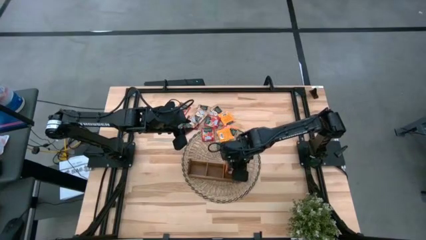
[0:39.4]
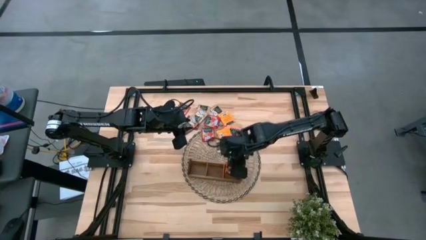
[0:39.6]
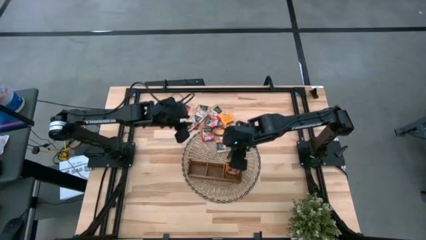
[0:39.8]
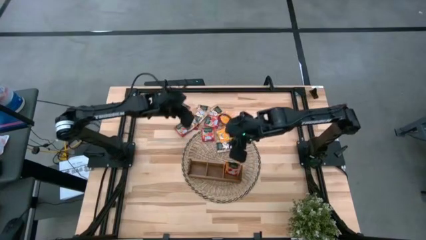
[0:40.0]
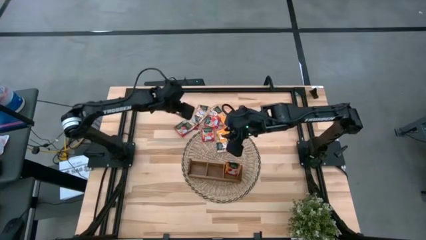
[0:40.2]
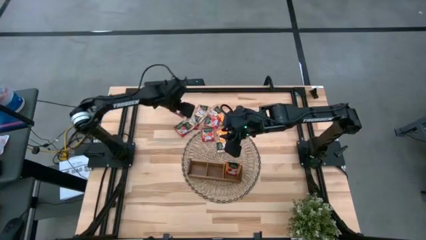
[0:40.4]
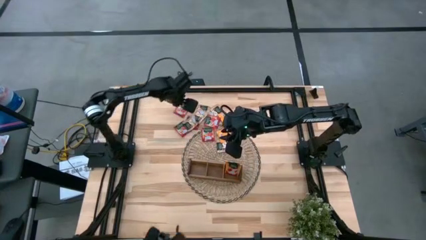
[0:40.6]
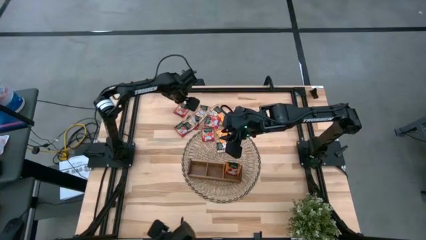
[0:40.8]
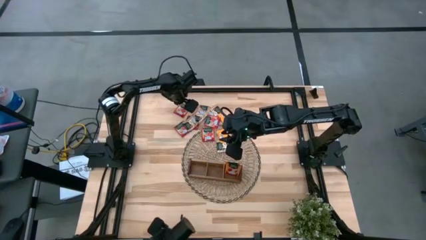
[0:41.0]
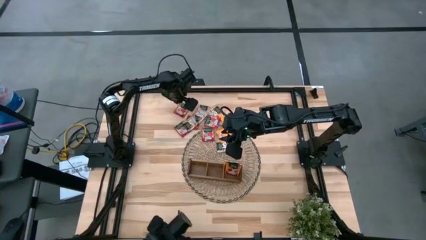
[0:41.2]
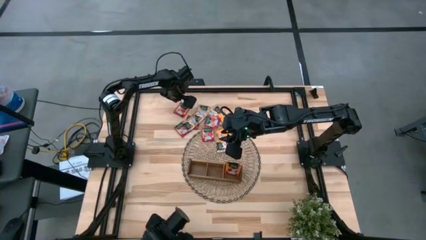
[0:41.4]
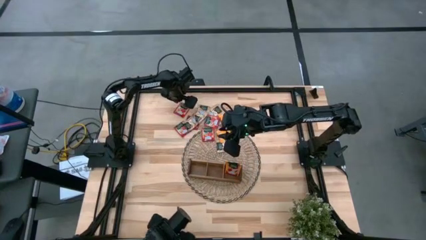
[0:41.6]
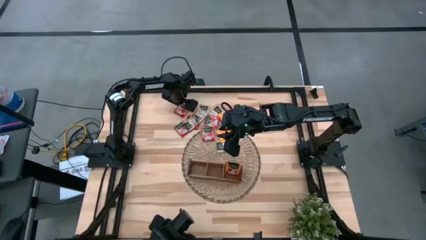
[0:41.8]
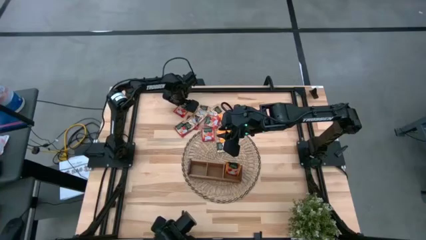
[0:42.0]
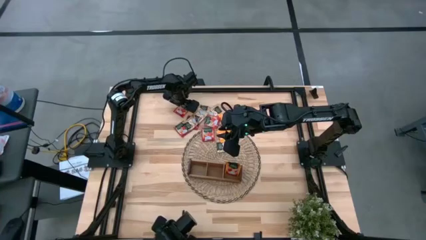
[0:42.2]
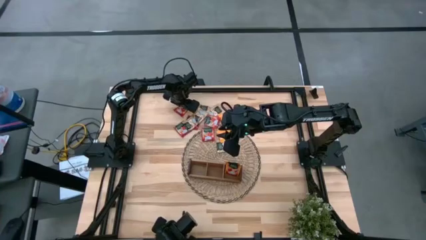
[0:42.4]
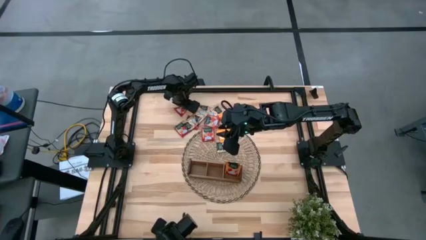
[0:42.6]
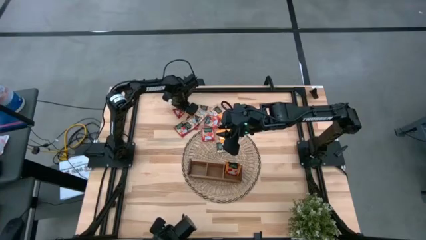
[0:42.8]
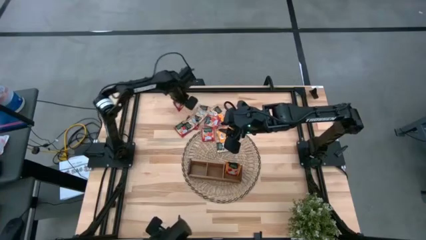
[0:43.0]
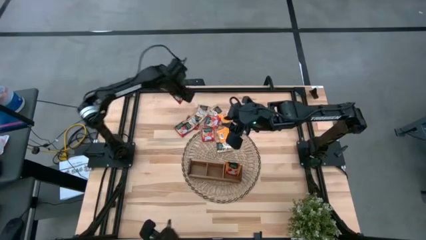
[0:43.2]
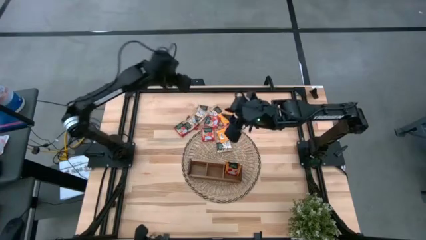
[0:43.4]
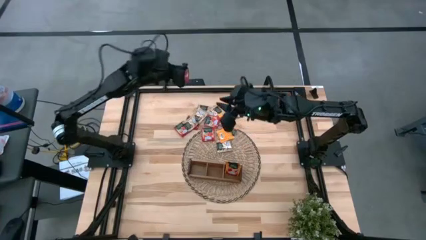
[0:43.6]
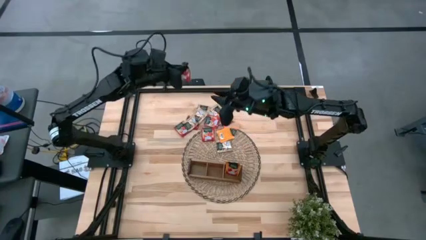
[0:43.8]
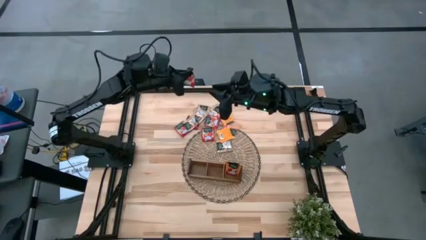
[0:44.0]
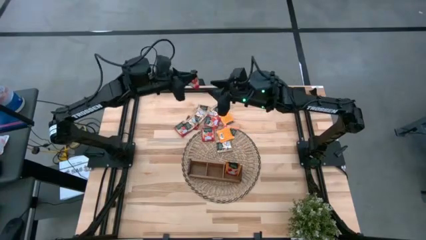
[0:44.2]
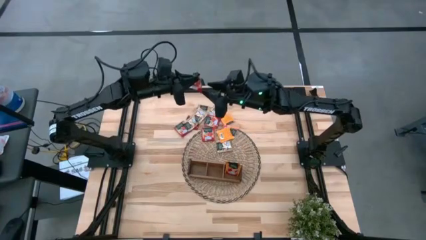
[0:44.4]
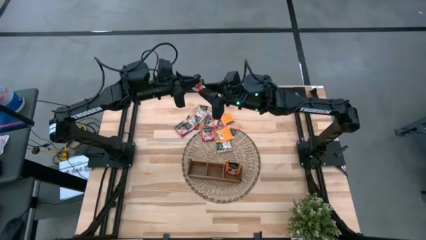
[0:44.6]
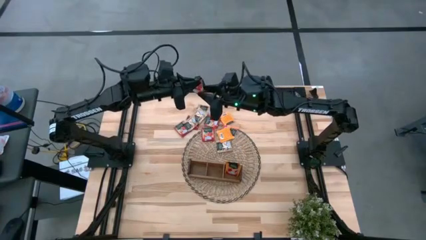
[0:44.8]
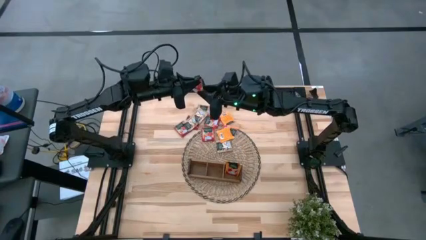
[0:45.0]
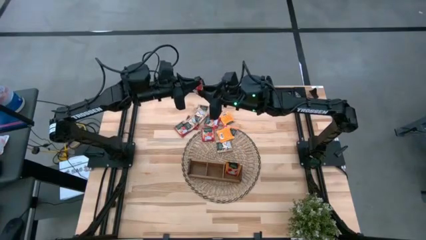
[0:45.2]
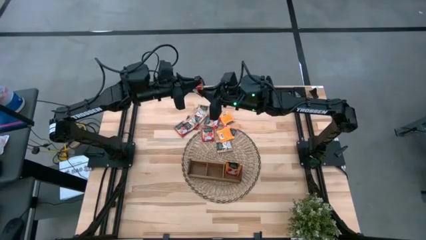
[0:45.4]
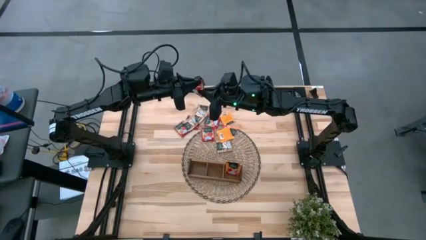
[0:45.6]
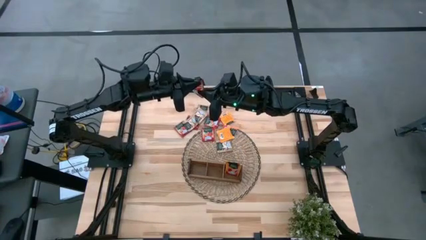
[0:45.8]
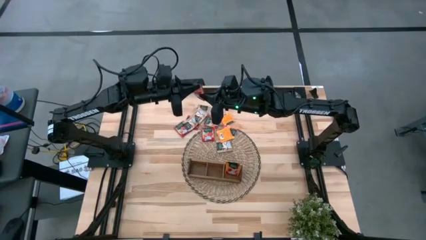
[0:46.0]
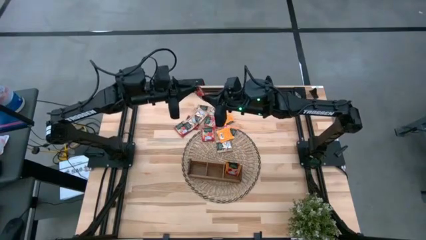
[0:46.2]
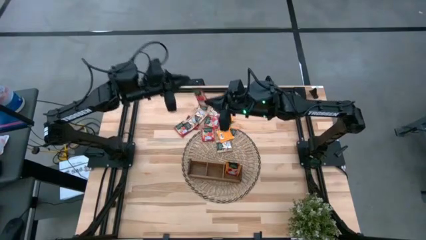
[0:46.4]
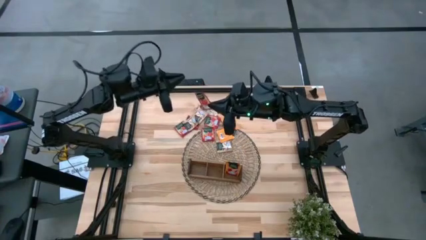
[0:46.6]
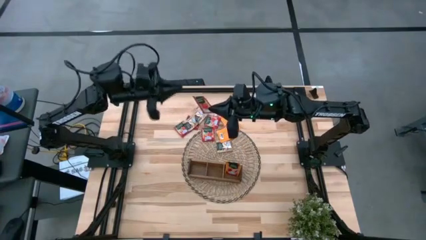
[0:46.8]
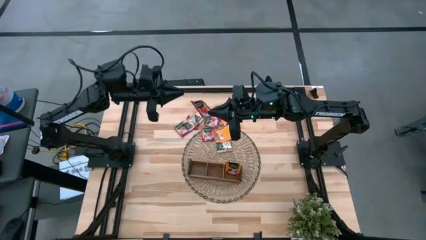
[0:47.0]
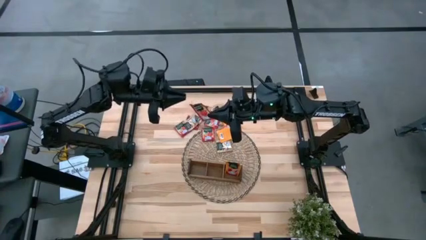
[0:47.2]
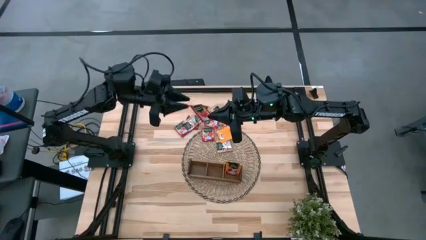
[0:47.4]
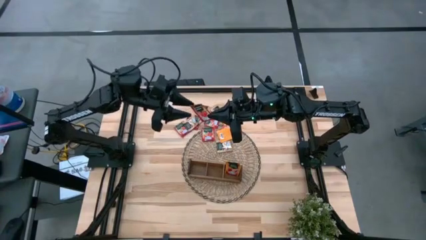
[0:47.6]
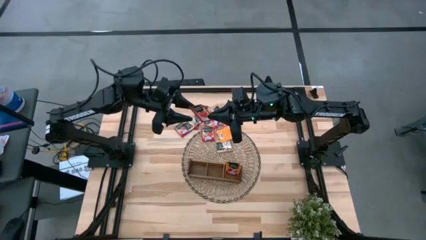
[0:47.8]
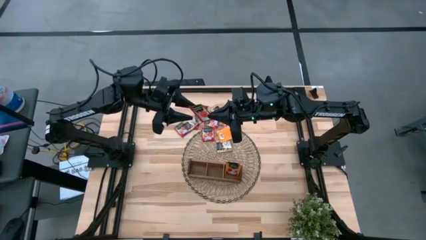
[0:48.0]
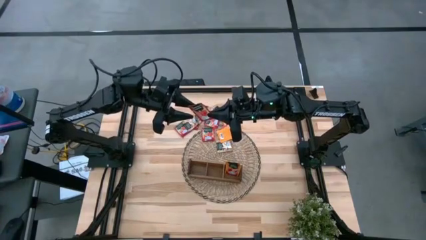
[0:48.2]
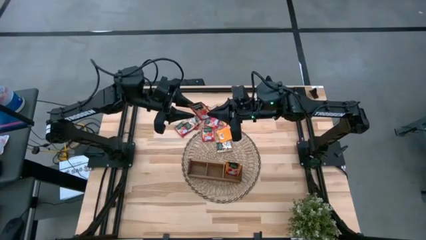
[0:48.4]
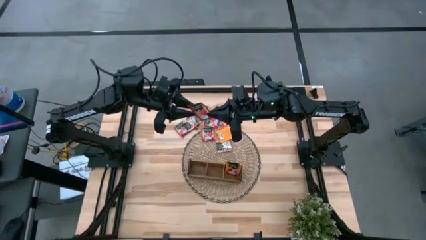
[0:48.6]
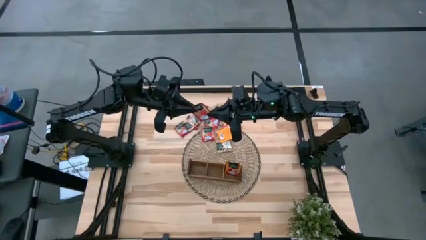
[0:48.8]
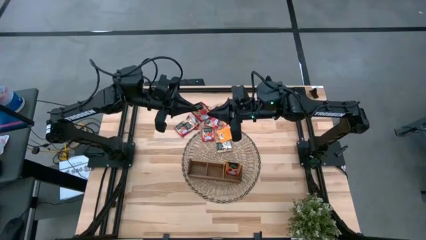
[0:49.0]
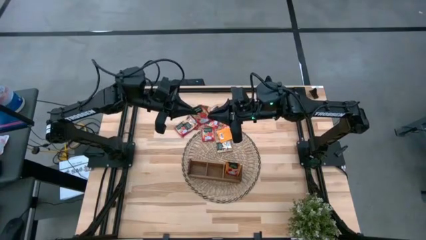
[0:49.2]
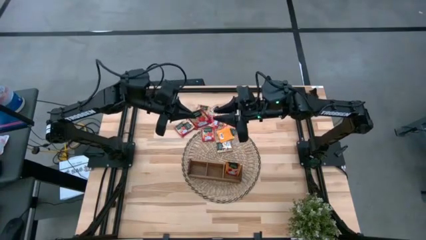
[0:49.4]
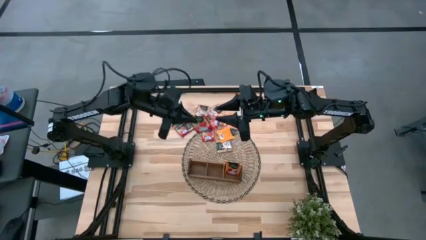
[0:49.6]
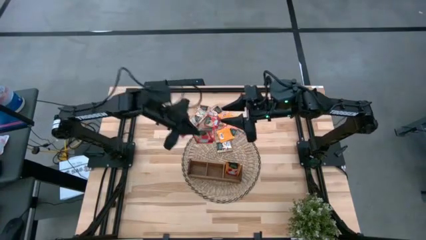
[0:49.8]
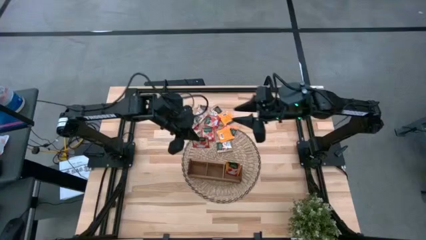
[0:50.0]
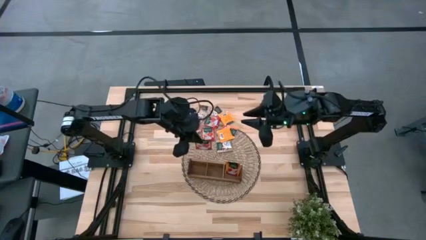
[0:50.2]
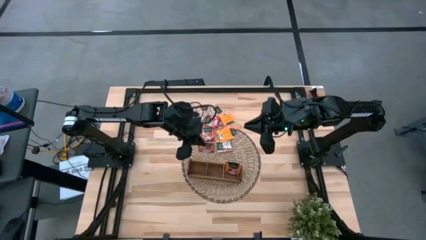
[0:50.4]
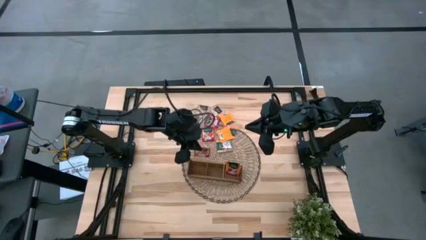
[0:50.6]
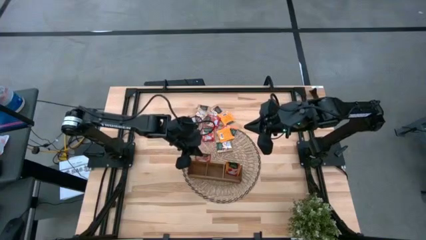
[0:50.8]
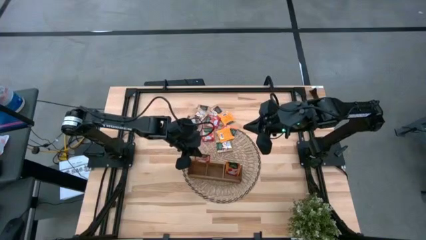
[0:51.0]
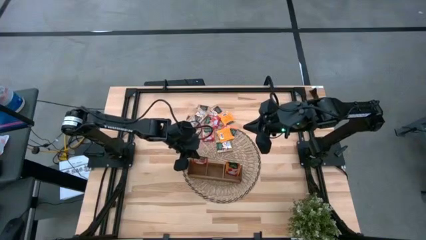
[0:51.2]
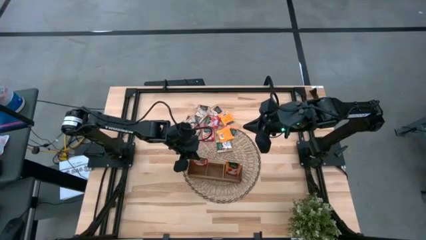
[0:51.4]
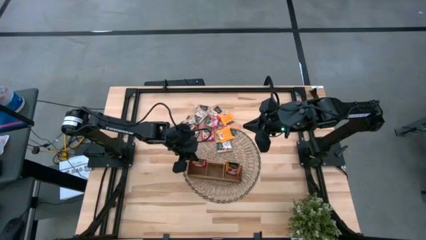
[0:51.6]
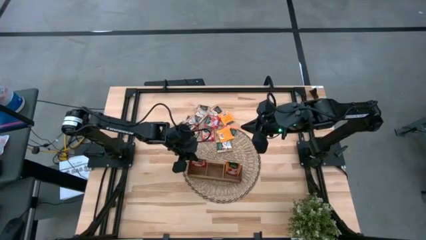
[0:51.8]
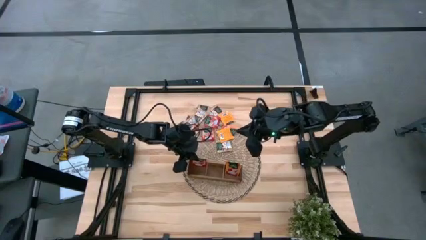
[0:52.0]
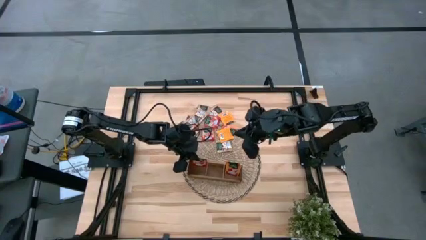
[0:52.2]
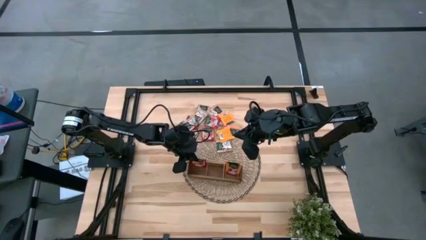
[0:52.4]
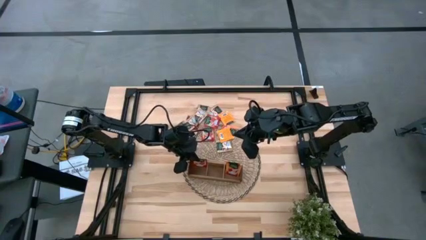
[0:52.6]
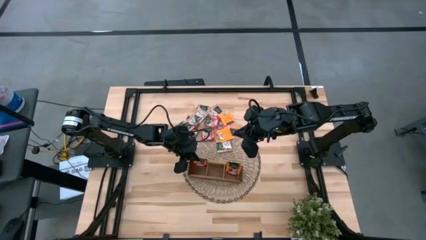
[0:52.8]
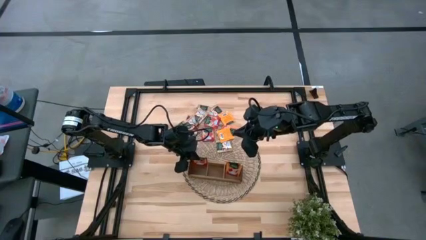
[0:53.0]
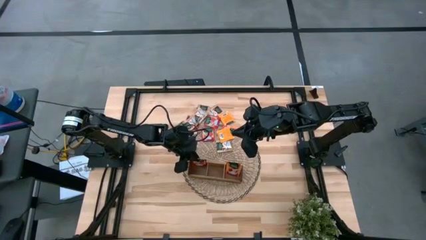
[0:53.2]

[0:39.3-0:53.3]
Task: Pick & Place Tea
Put the red tea bag into the left section of the wooden organizer

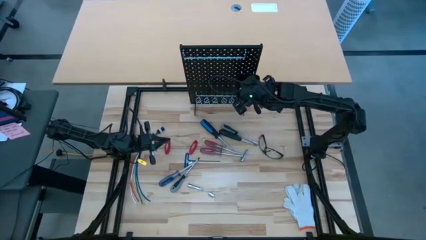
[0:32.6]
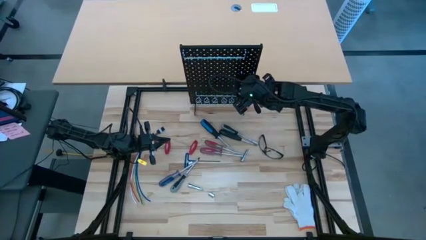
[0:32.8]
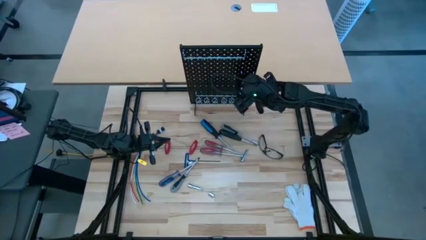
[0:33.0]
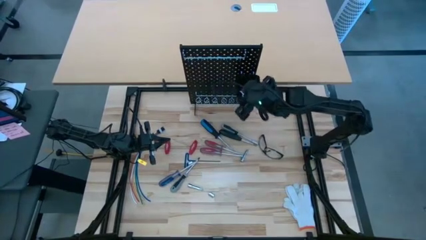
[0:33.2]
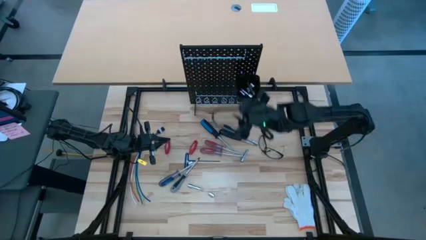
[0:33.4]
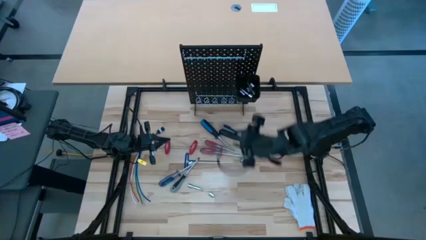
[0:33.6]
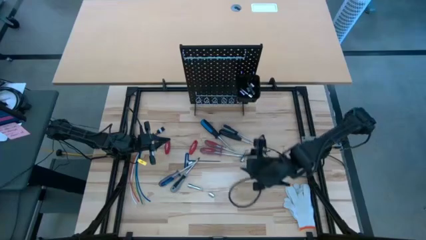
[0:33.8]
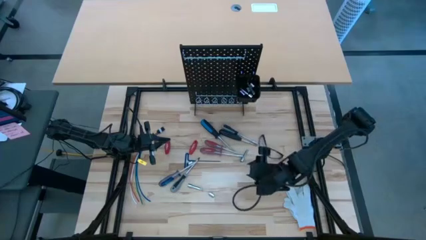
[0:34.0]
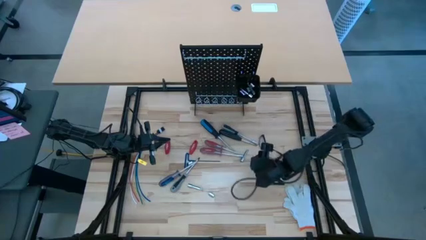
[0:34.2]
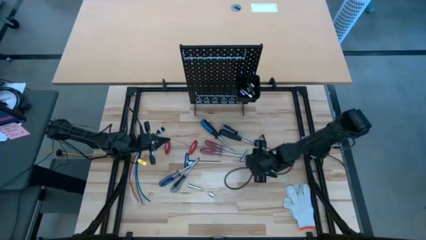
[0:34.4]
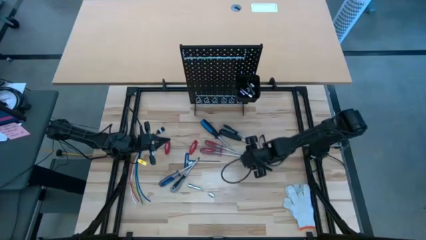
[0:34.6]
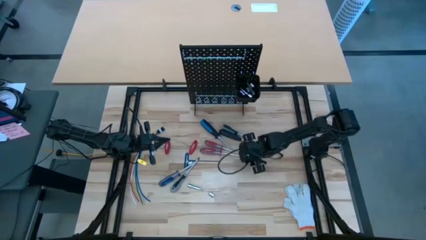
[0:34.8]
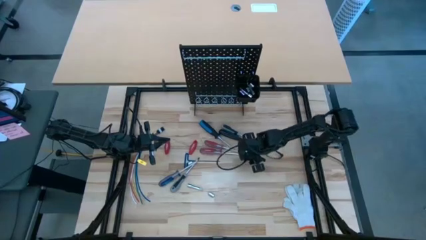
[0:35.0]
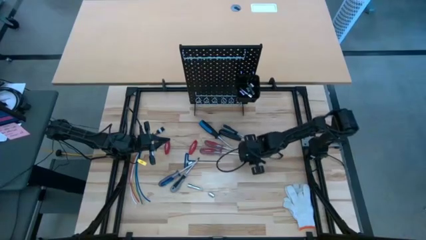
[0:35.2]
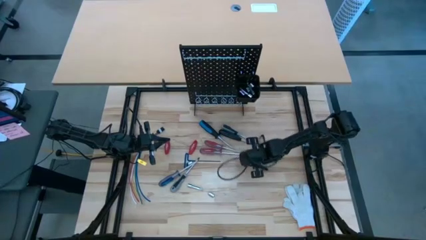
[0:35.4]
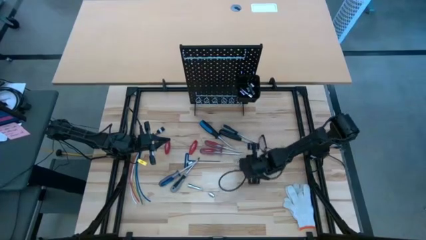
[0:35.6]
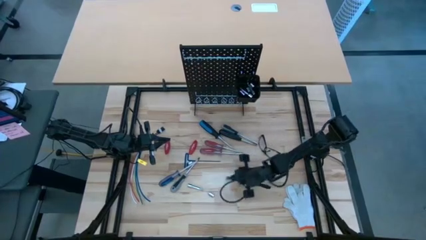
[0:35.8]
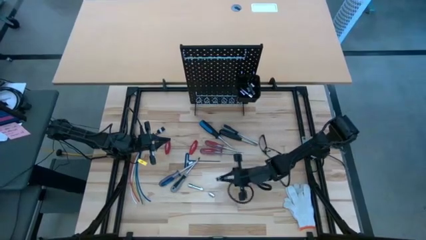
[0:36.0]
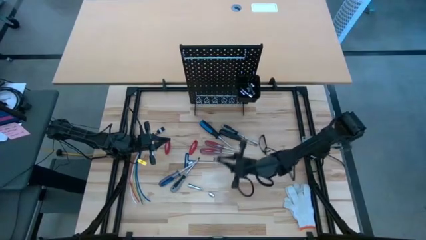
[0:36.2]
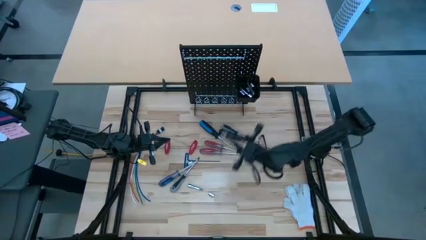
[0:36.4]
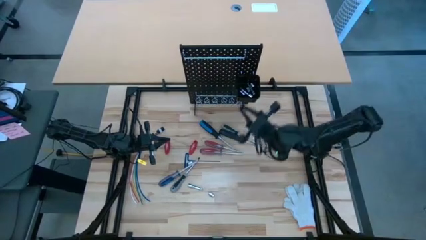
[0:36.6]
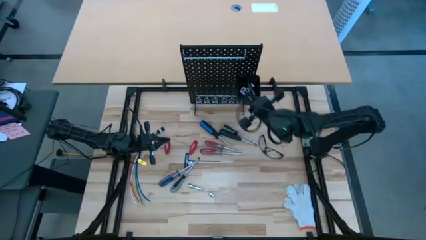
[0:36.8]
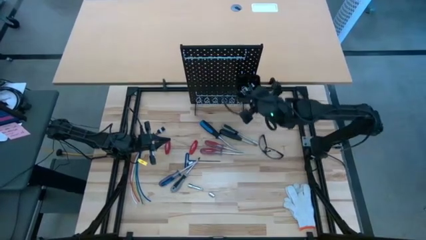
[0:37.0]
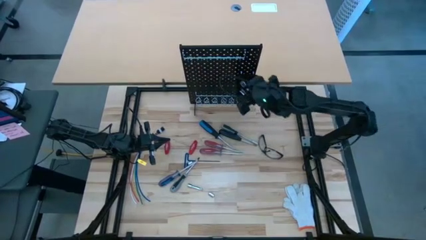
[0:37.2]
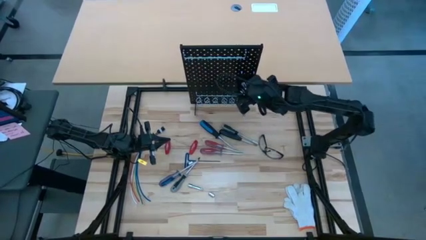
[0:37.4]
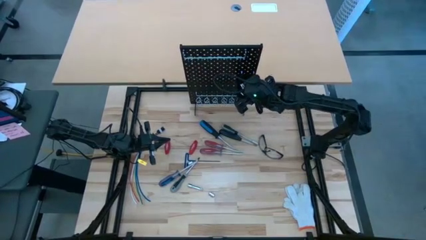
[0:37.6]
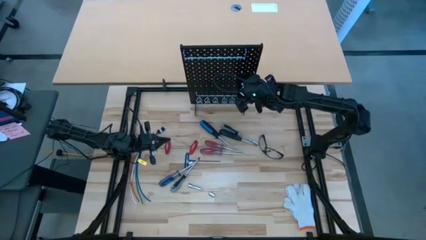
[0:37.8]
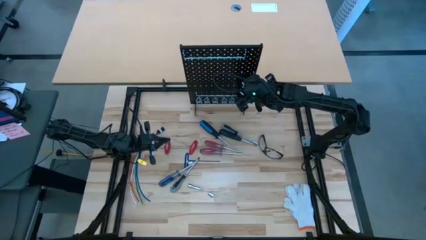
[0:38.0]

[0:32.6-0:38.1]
Task: Hang tools onto peg board
Put the extension bar into the bin of the pegboard
